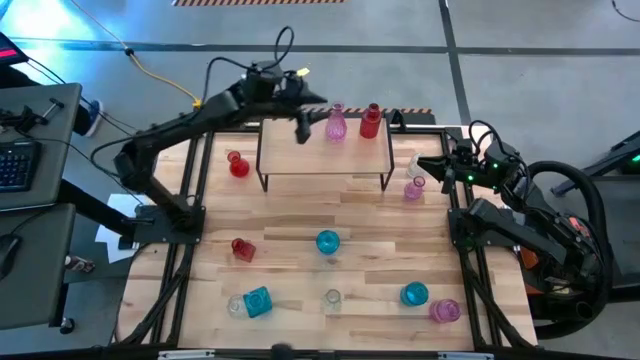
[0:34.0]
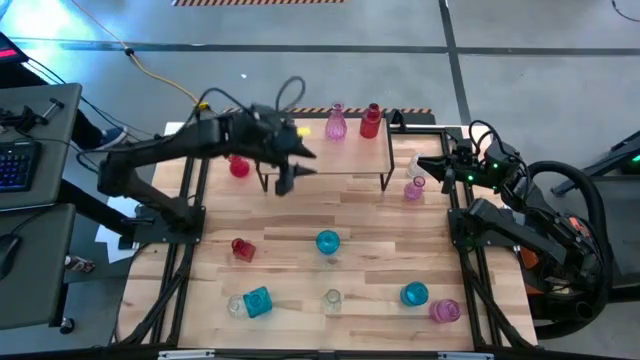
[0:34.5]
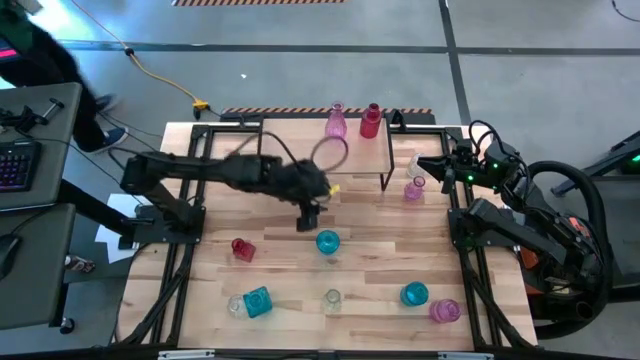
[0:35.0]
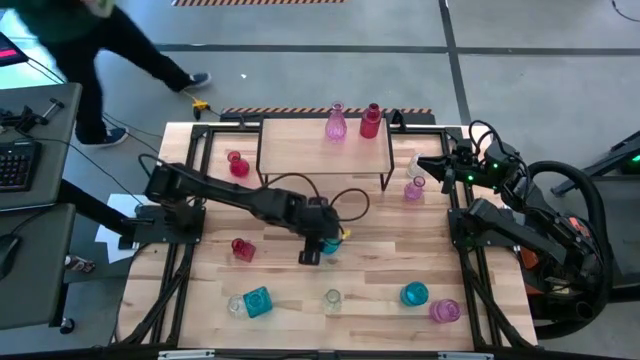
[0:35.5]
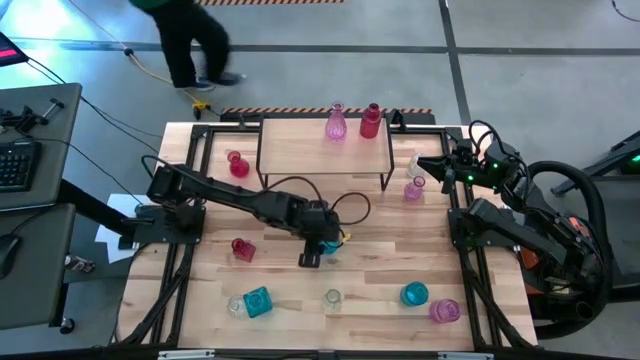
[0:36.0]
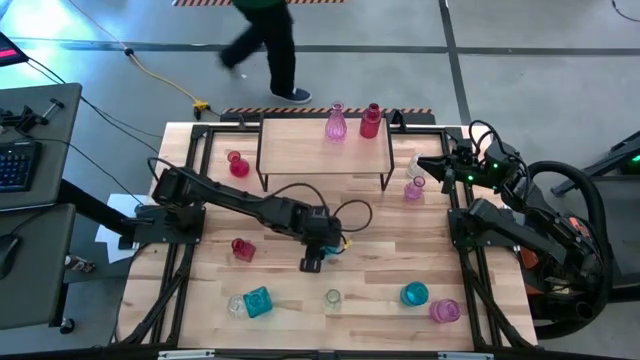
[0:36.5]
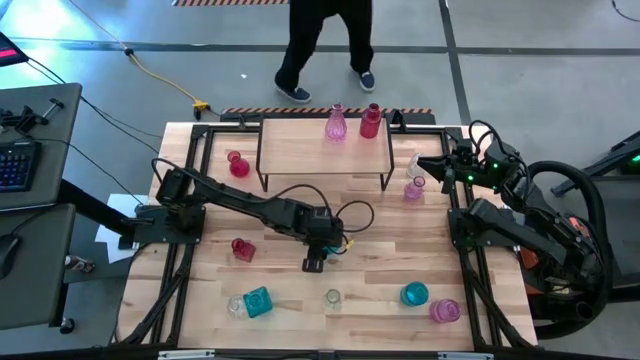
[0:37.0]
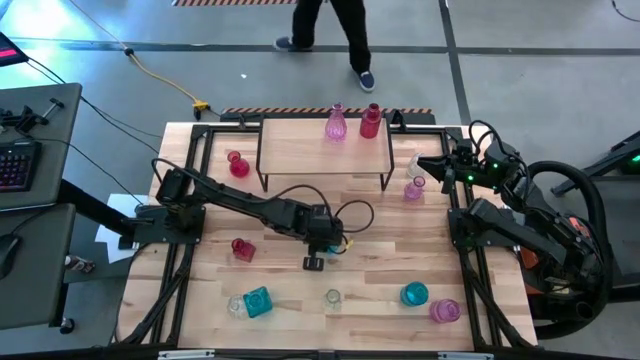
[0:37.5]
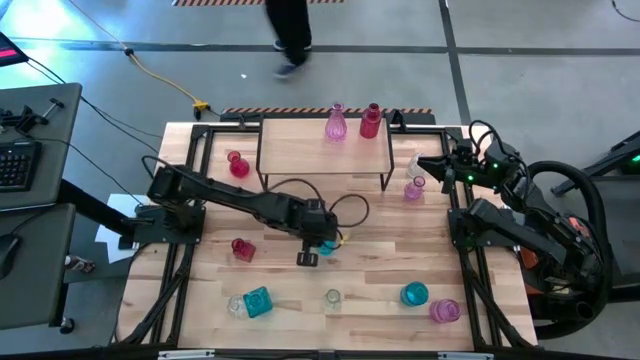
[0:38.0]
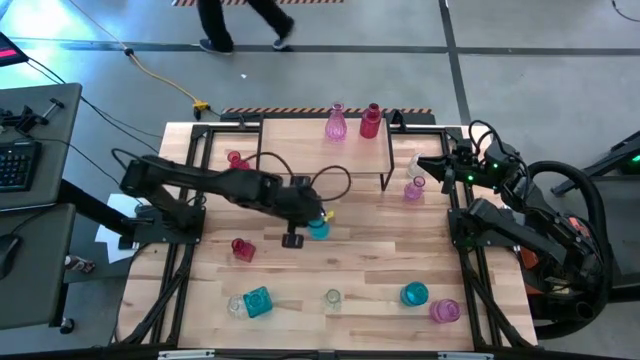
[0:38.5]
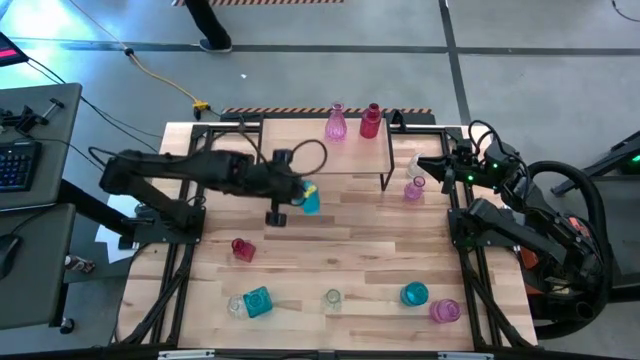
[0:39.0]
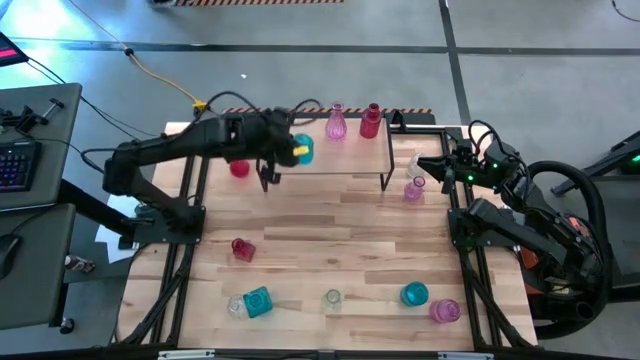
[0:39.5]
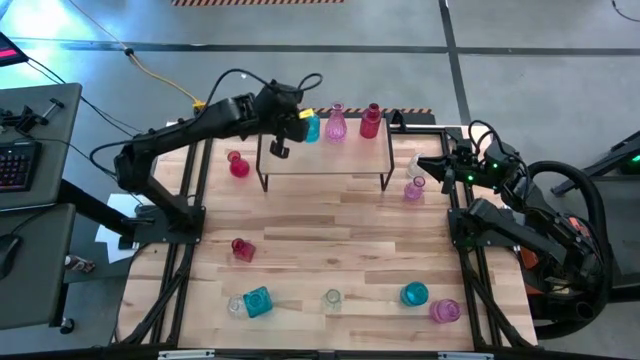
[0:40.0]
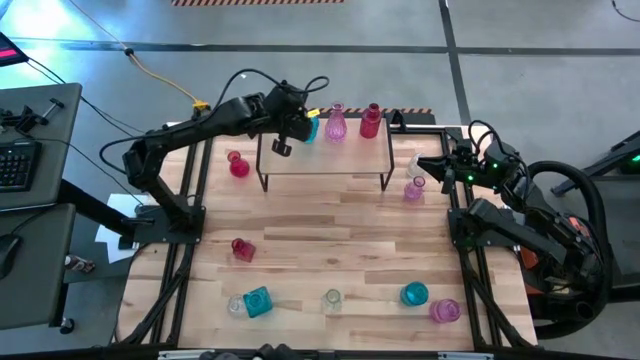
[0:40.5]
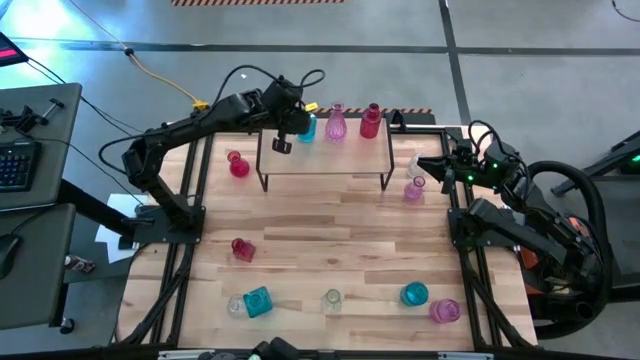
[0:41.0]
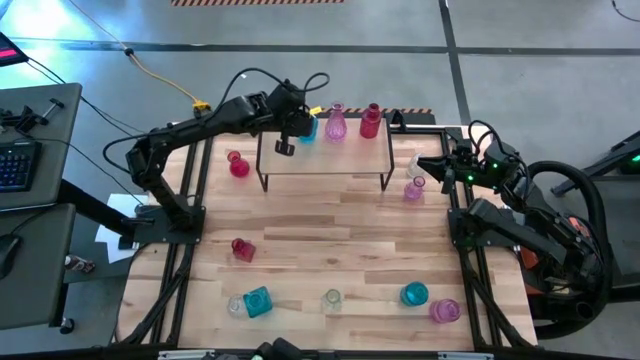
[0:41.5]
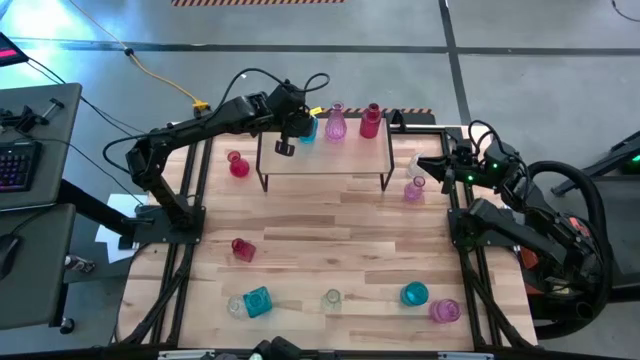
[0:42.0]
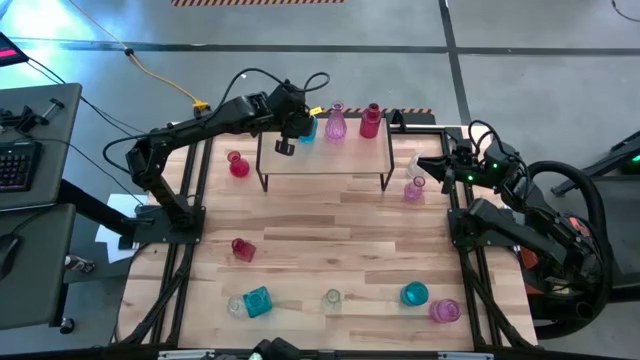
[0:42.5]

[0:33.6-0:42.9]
Task: sort vases onto shelf
Put the top blue flower vase on the shelf
